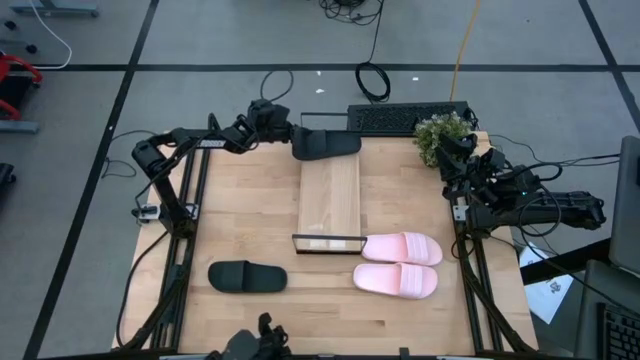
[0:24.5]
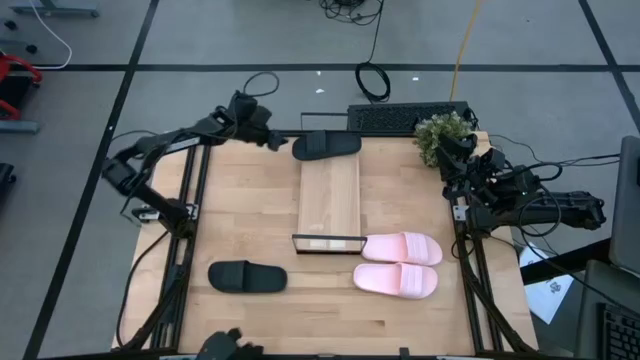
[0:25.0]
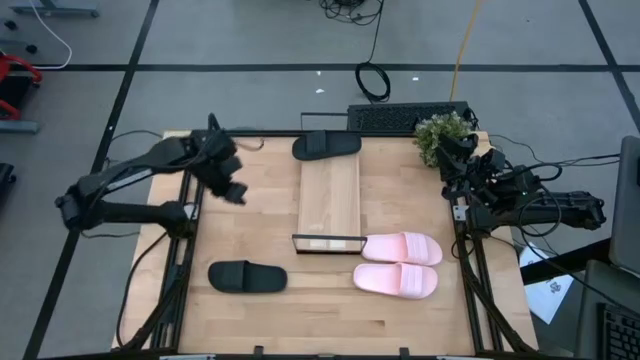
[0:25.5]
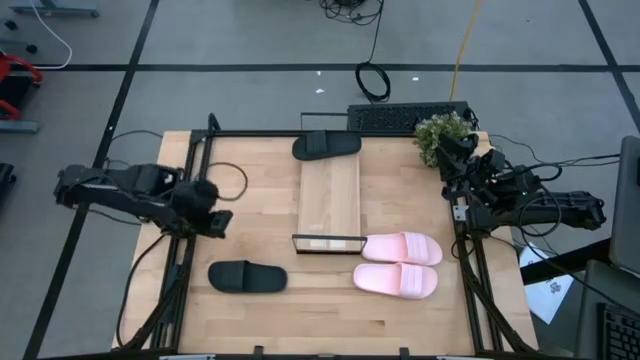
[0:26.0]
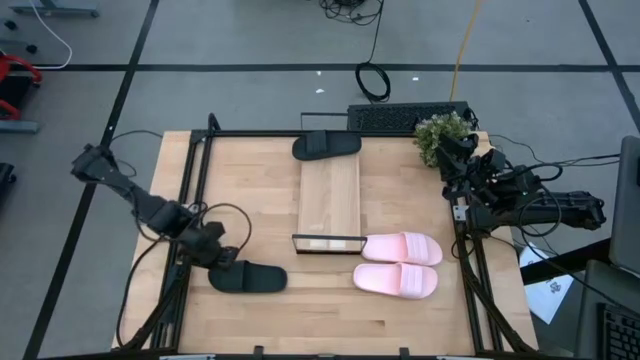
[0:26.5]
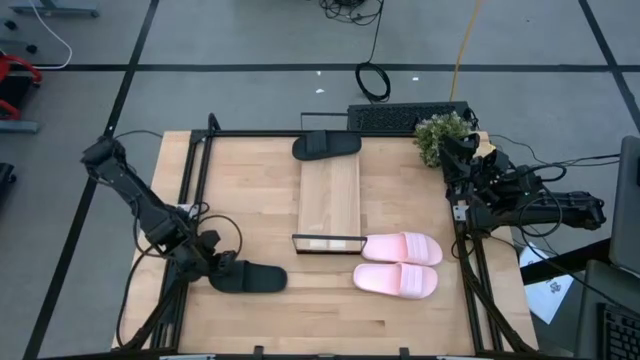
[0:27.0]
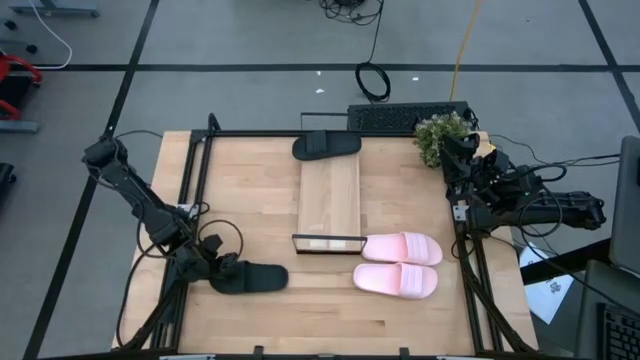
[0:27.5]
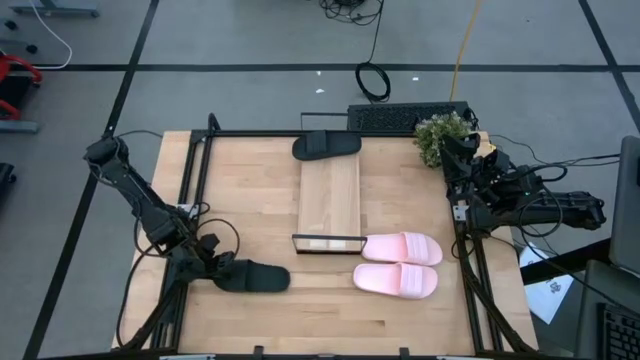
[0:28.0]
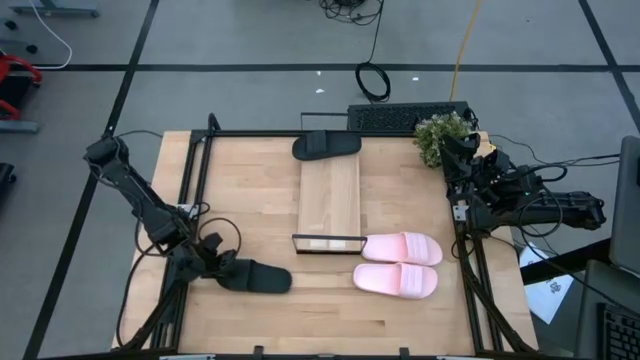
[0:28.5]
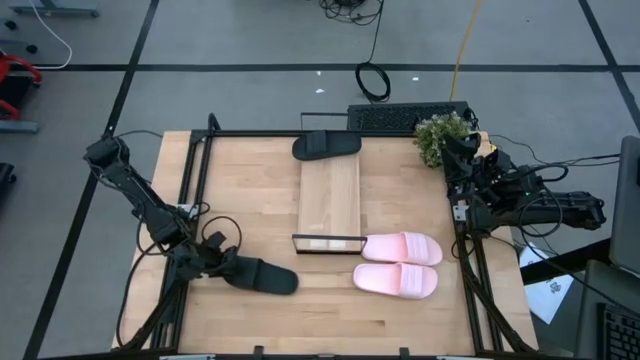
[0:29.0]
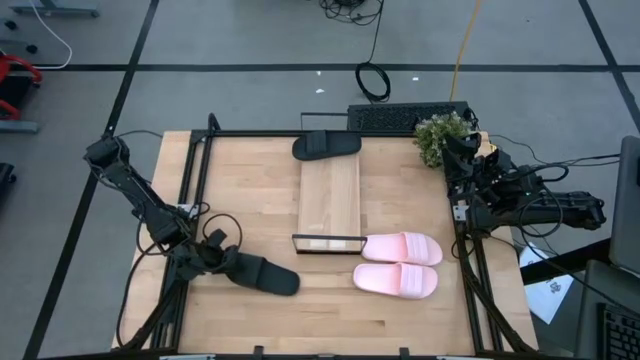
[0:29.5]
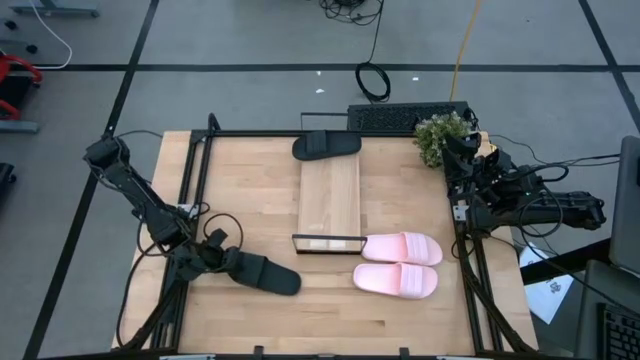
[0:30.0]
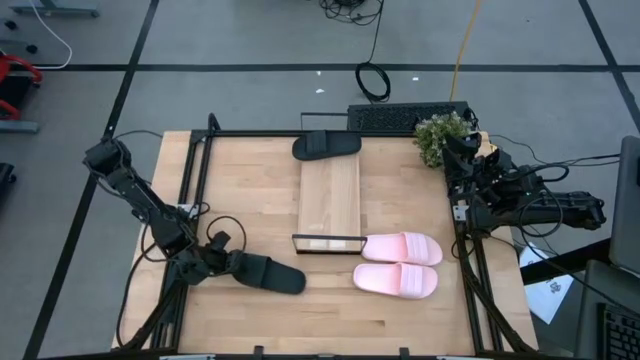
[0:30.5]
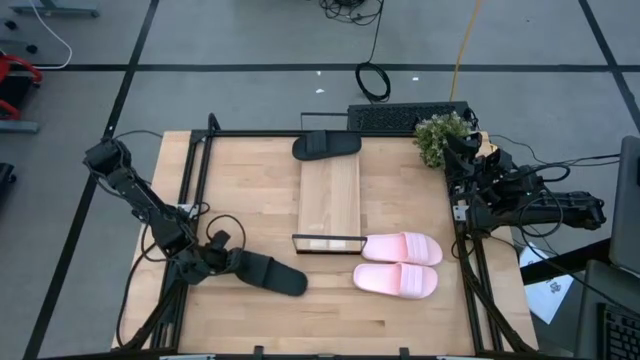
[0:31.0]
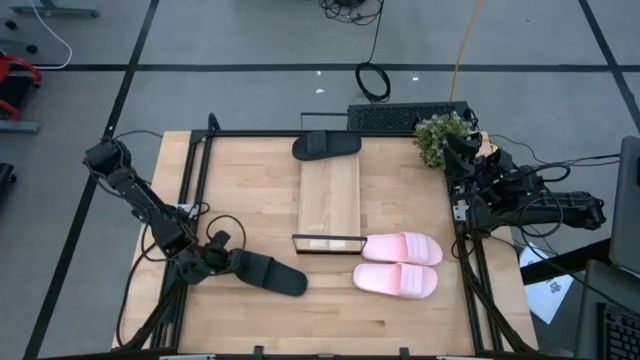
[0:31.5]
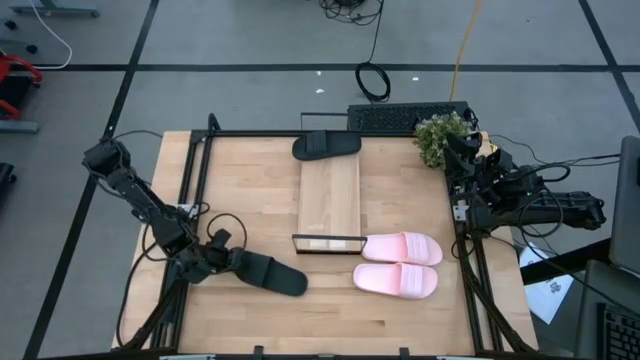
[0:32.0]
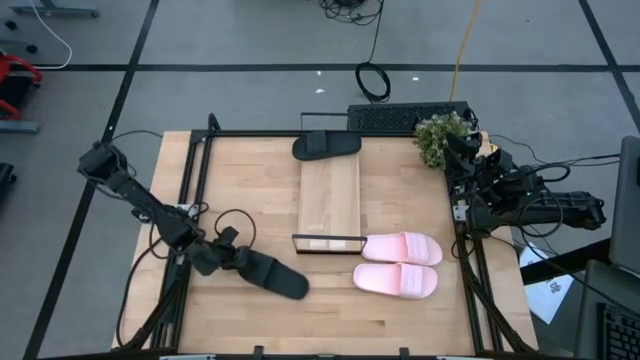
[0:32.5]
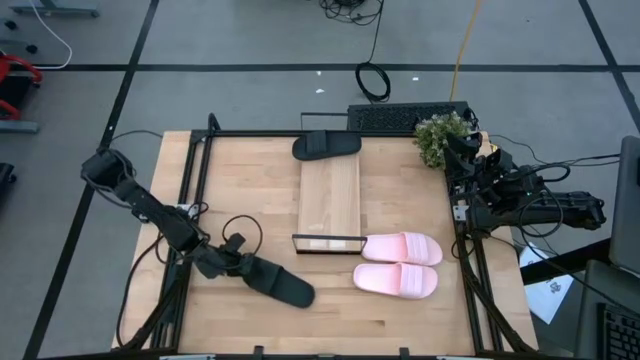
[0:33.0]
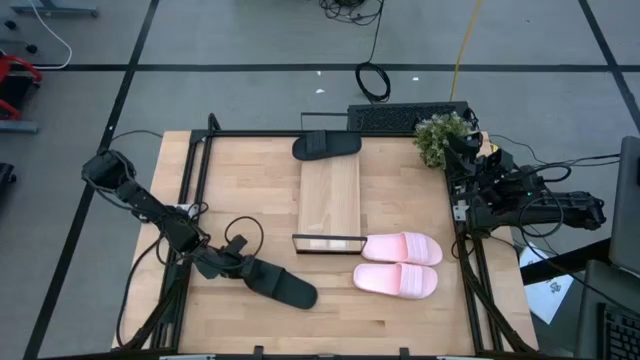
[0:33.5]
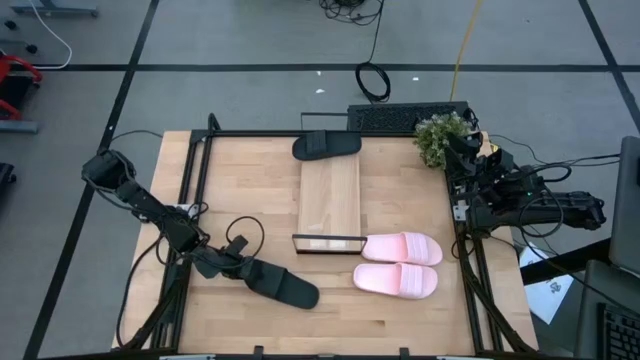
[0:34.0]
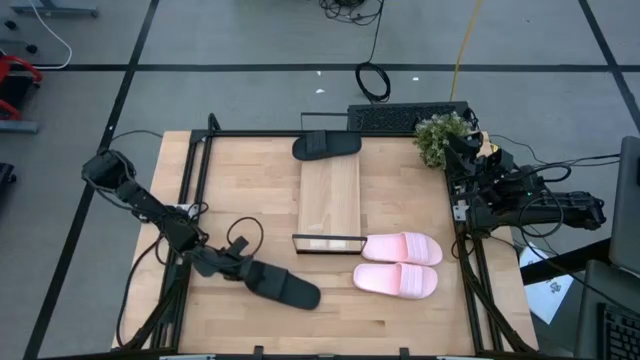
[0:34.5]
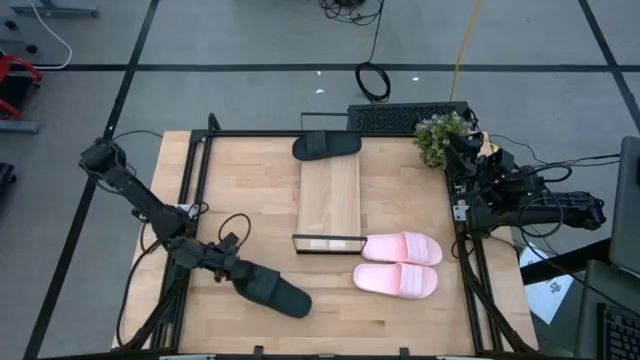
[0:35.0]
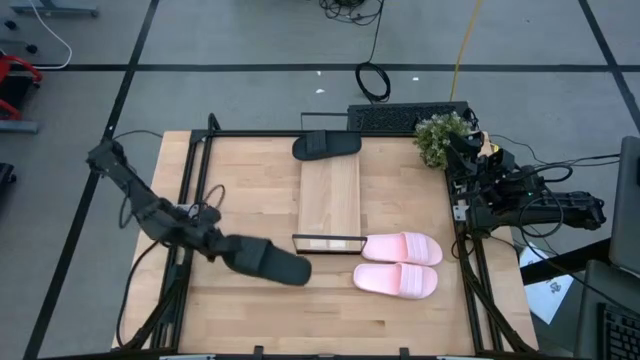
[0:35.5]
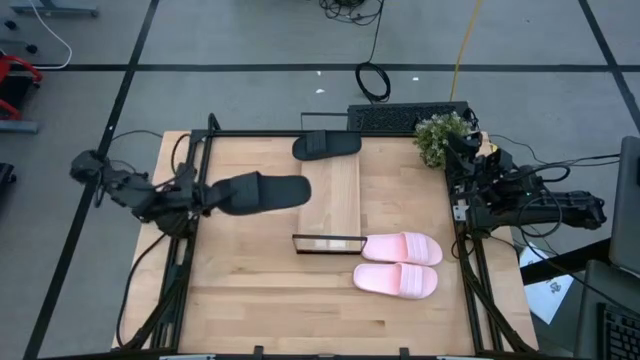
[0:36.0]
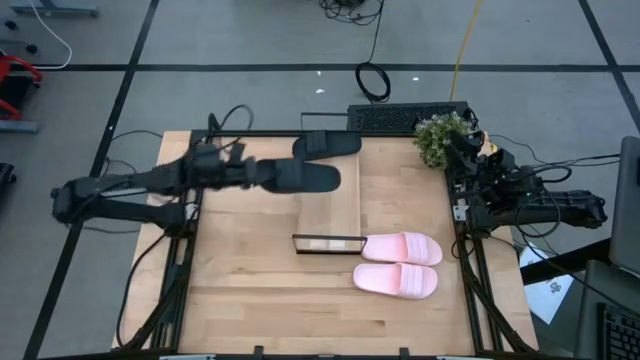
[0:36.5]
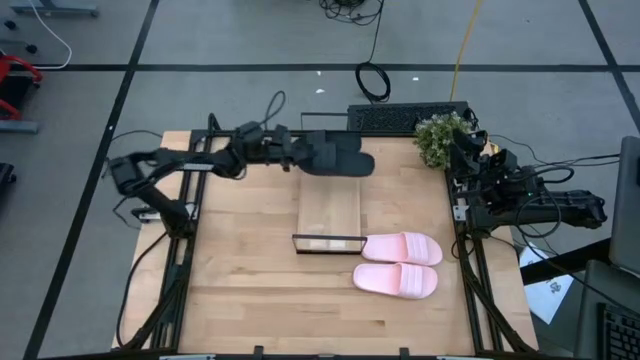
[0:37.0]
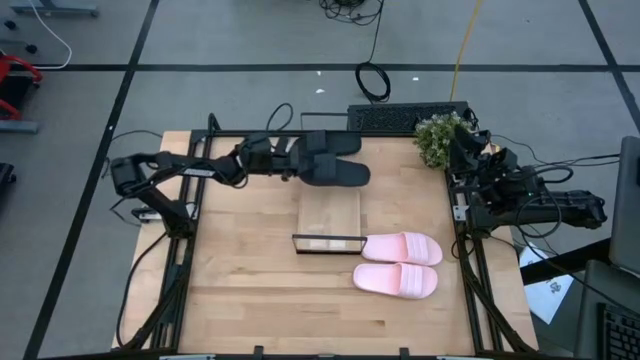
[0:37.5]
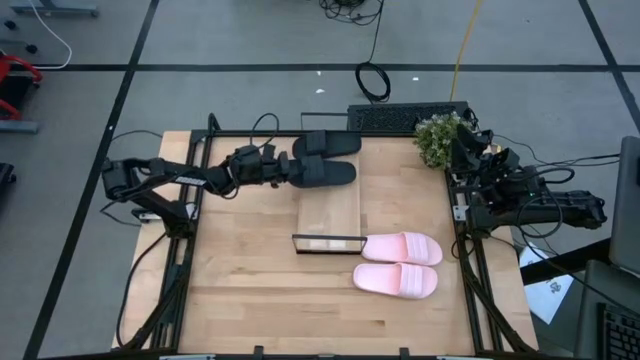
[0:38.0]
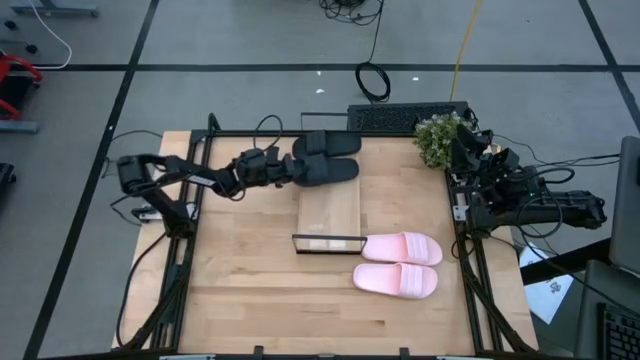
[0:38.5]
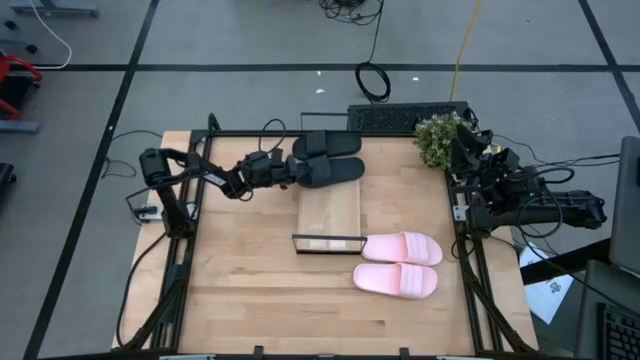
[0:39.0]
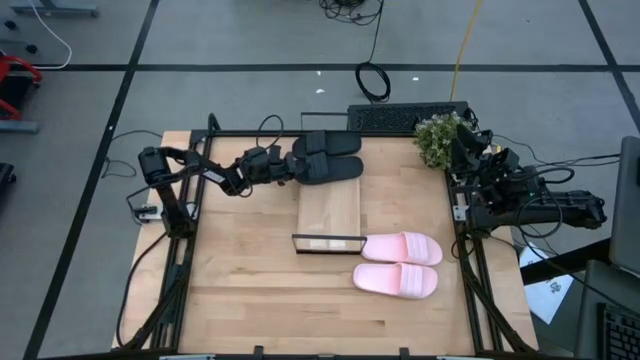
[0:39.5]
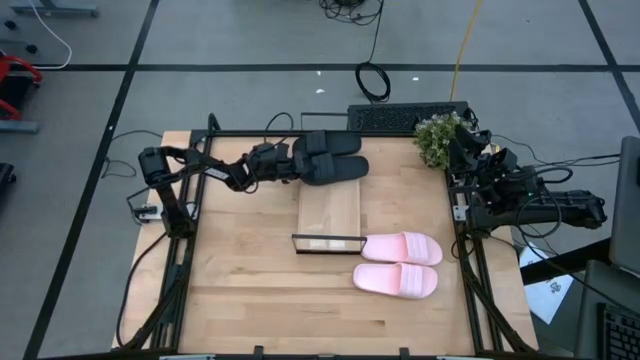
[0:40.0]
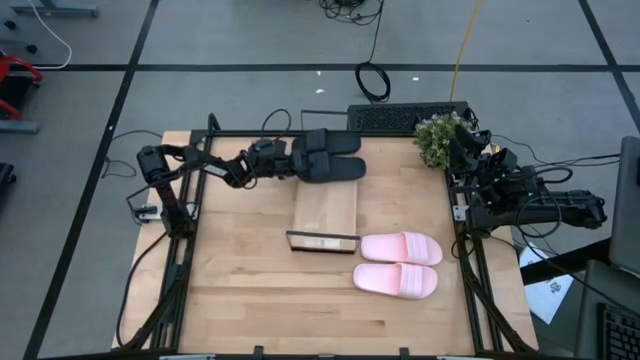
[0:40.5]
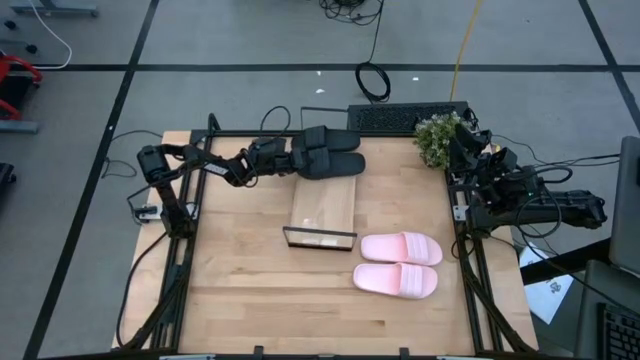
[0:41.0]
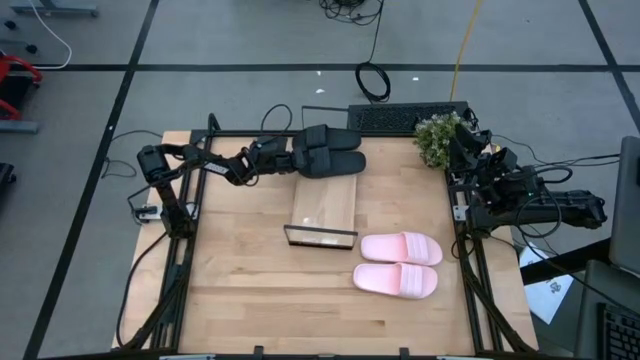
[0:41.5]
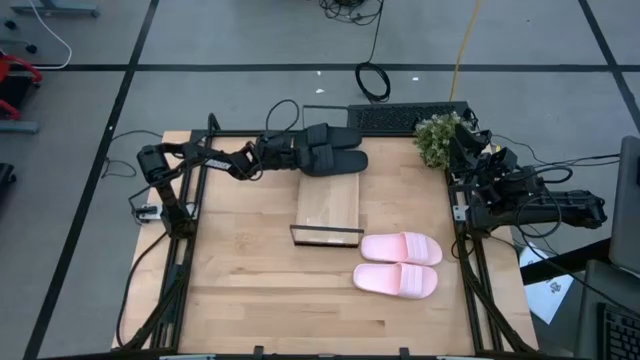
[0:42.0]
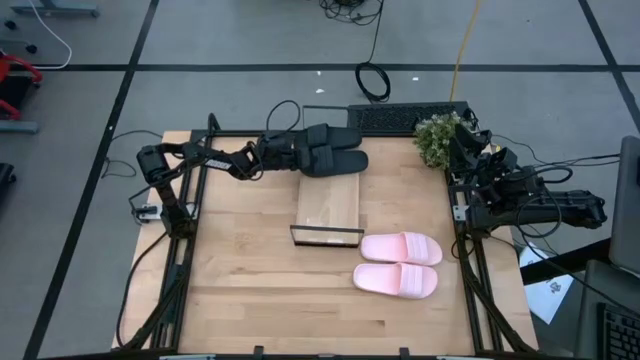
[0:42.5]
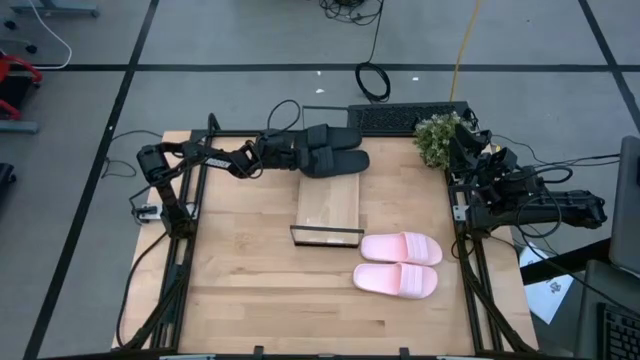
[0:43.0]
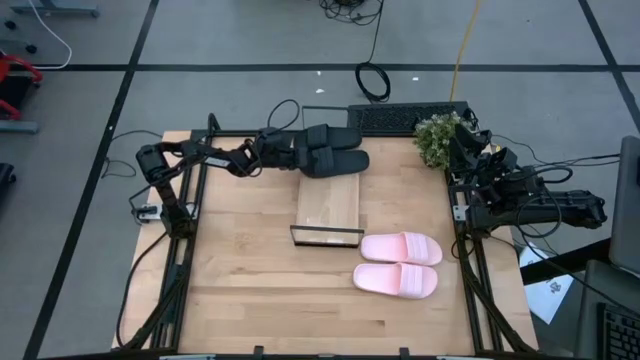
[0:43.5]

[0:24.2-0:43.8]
Task: Pick and place slides into the shelf
Put the black slides on the shelf

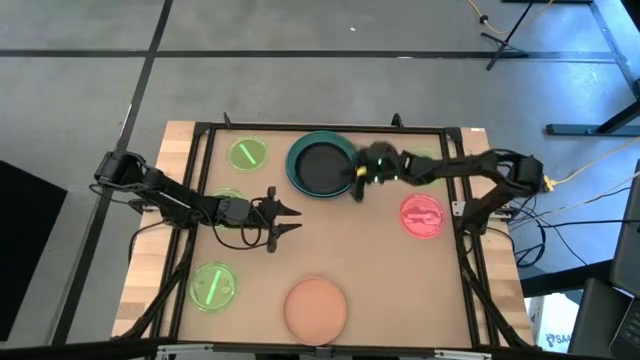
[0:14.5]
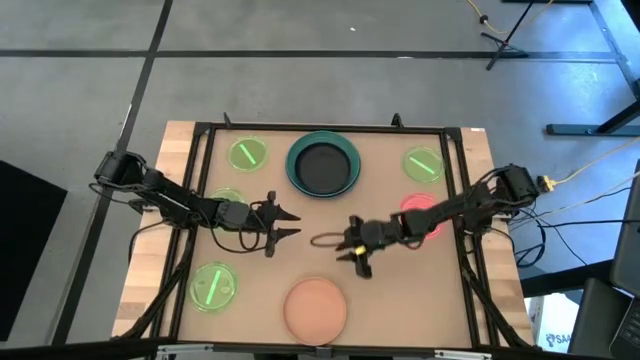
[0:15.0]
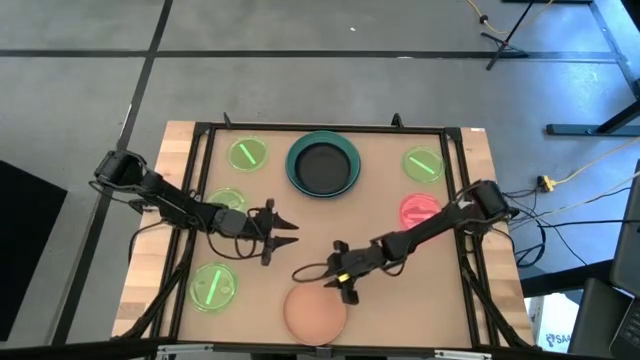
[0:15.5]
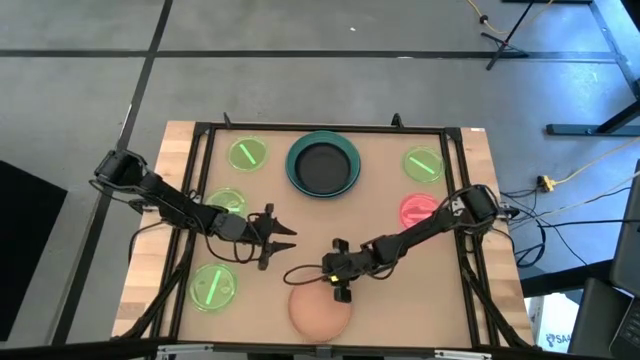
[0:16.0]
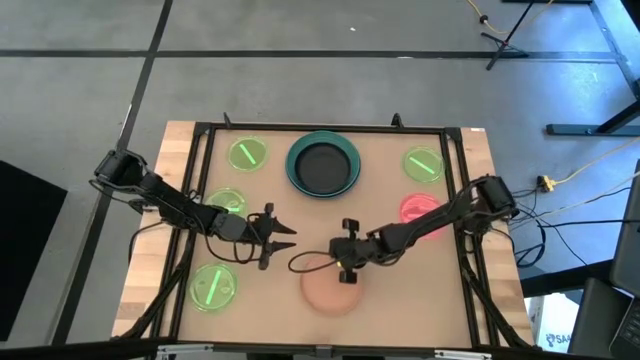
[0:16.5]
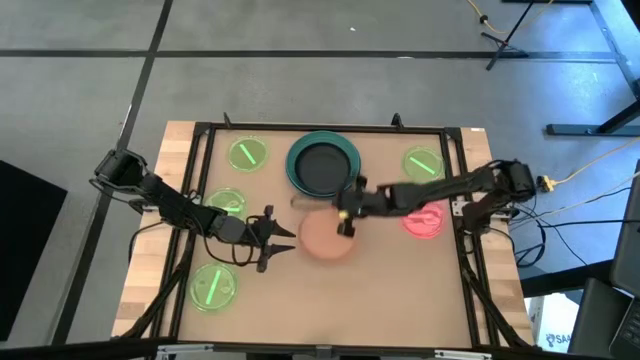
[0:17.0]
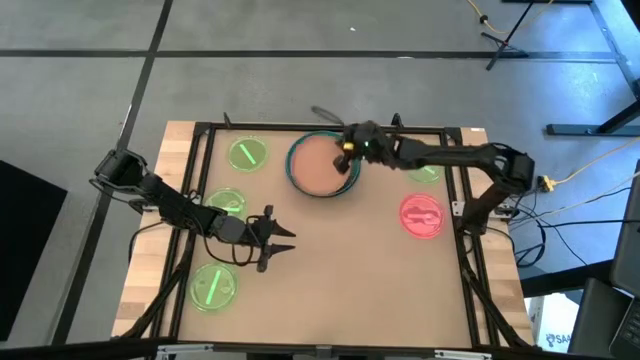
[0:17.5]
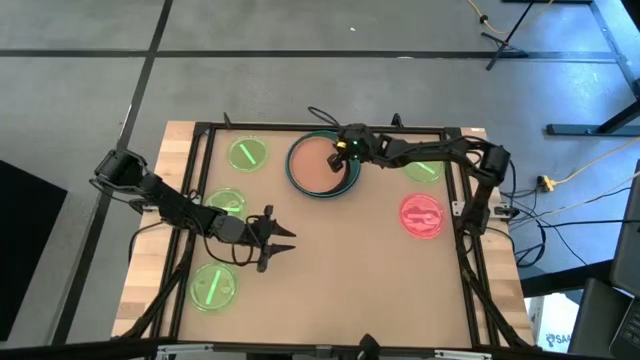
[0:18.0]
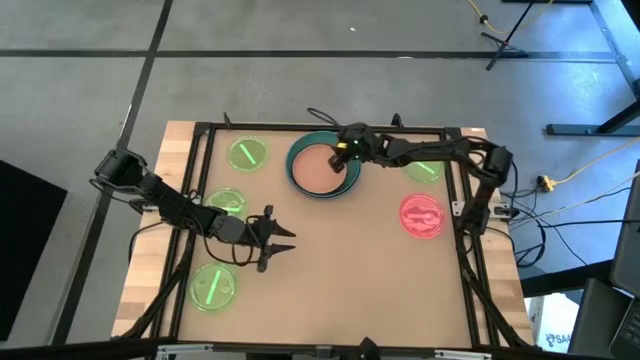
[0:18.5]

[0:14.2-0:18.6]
Task: Stack plastic plates
Stack the orange plate on top of the black plate
